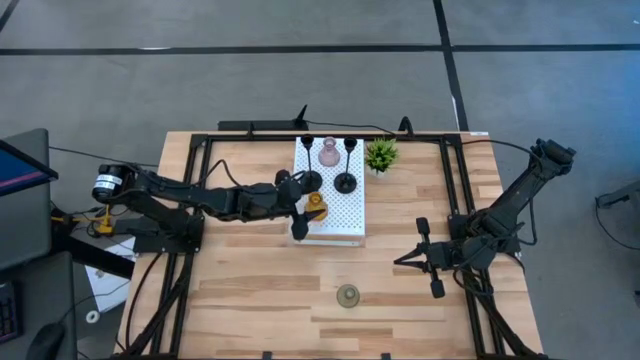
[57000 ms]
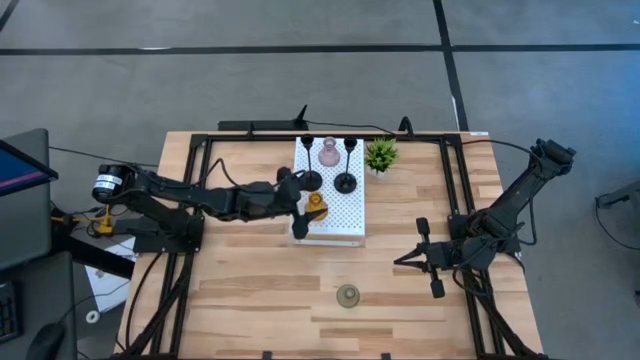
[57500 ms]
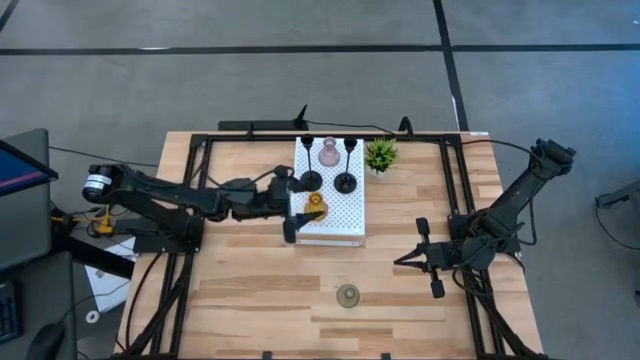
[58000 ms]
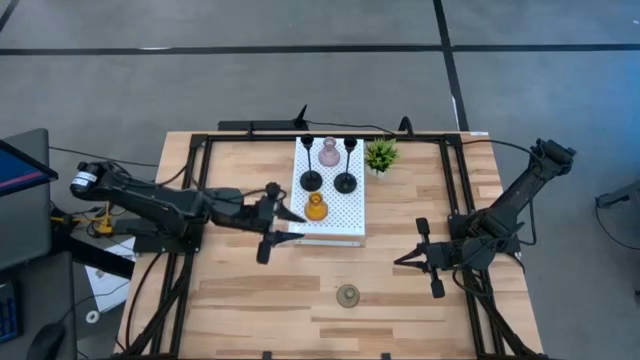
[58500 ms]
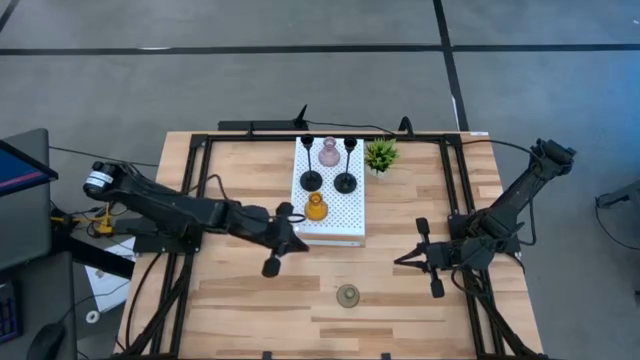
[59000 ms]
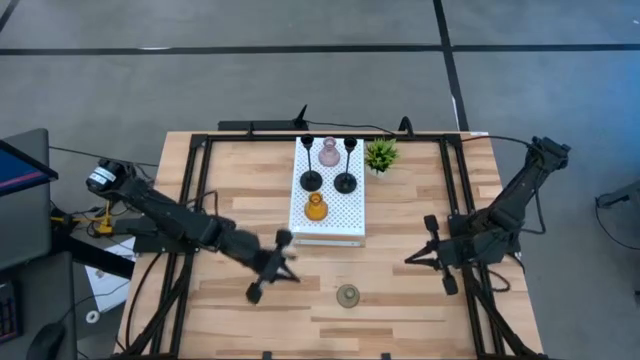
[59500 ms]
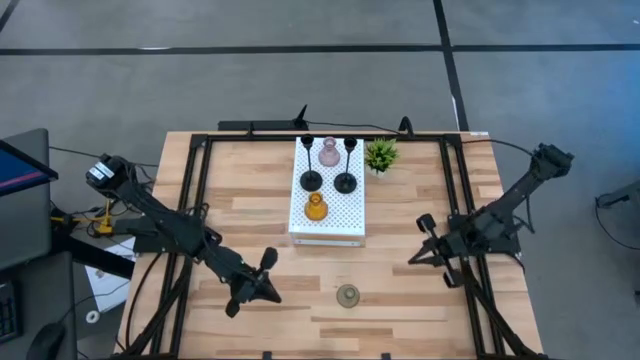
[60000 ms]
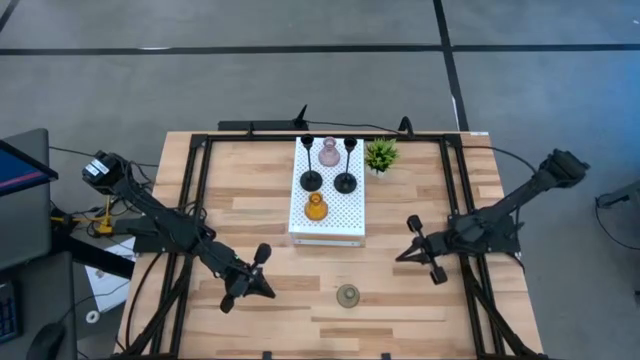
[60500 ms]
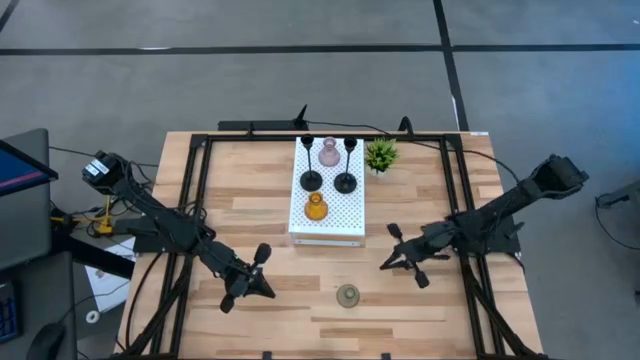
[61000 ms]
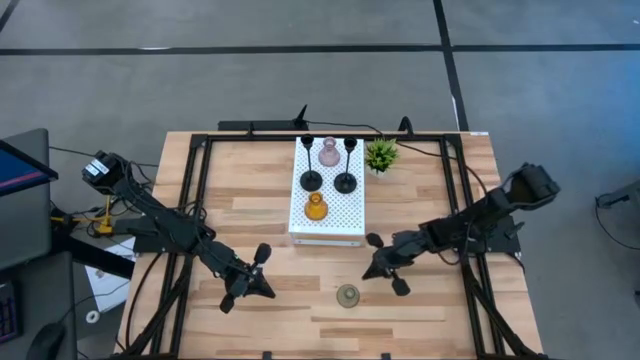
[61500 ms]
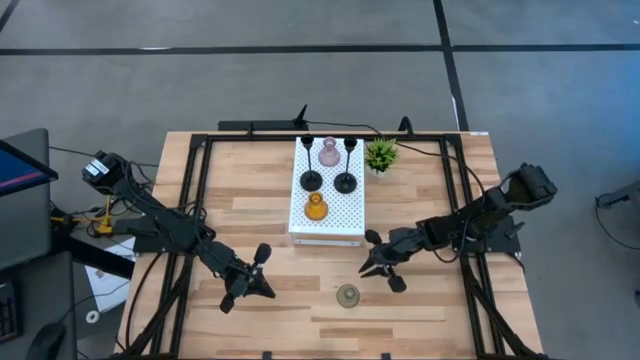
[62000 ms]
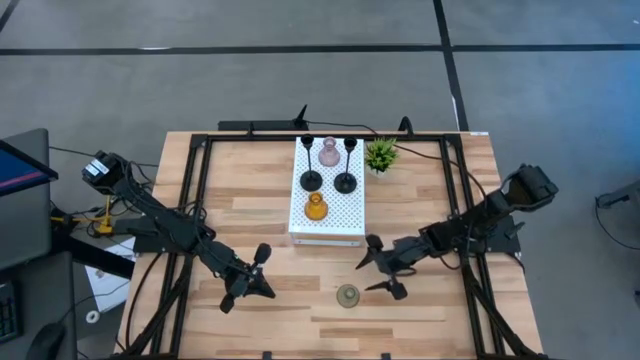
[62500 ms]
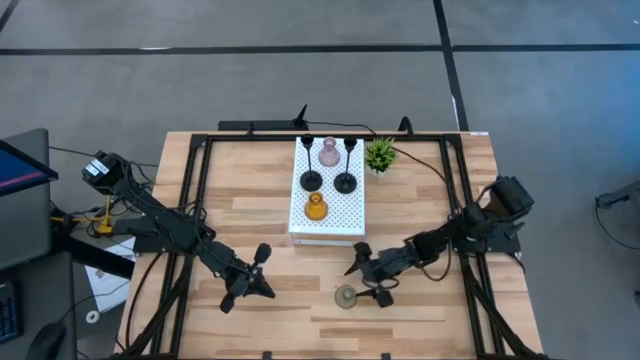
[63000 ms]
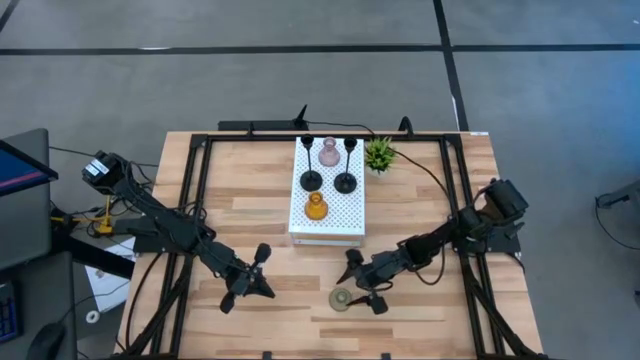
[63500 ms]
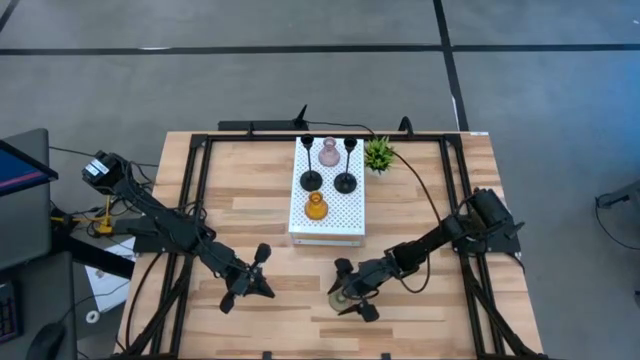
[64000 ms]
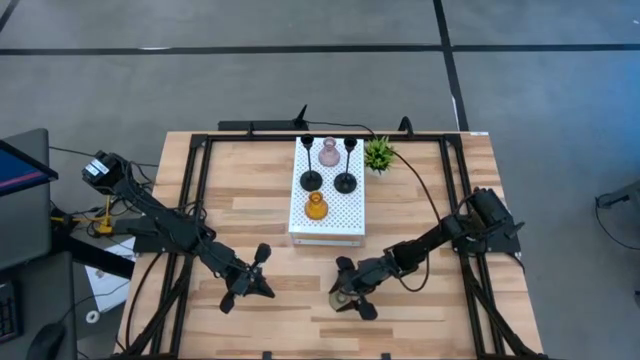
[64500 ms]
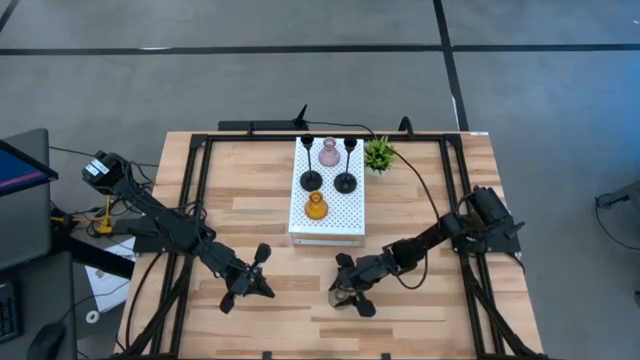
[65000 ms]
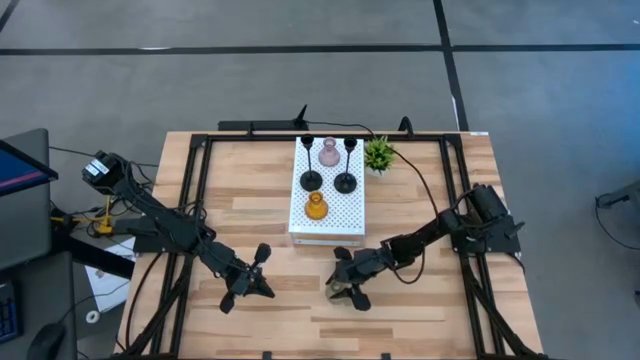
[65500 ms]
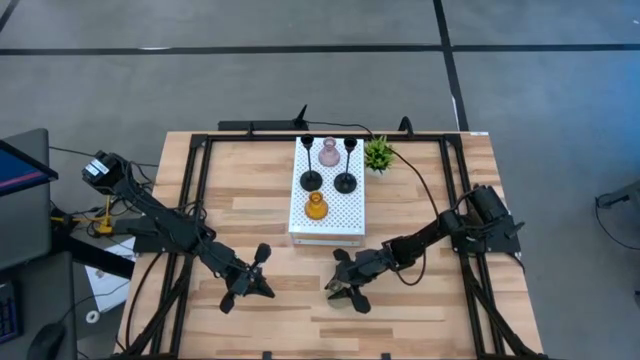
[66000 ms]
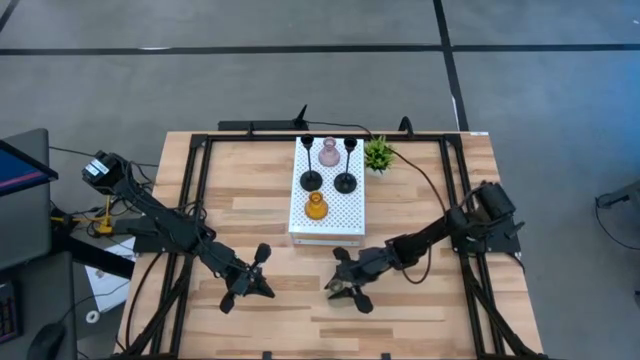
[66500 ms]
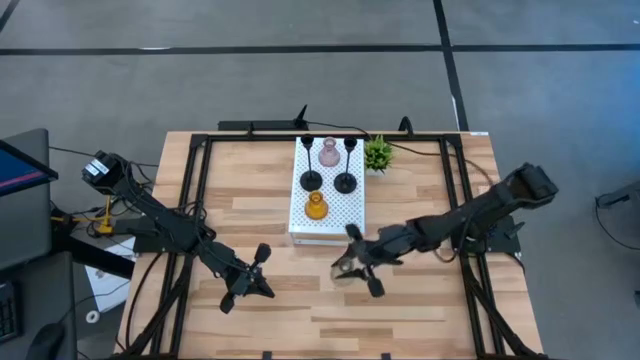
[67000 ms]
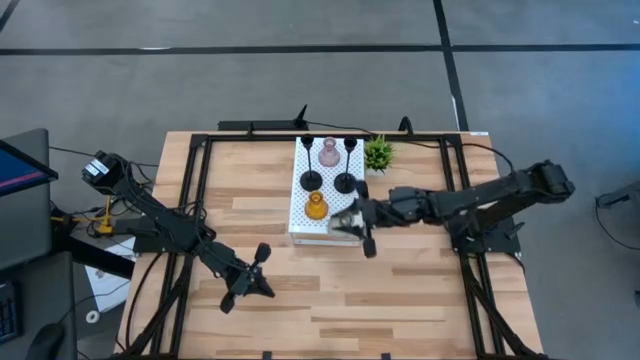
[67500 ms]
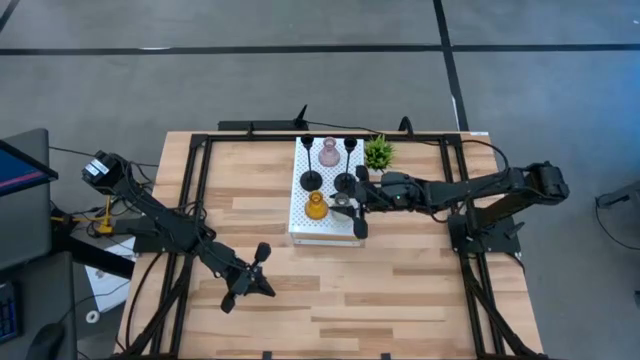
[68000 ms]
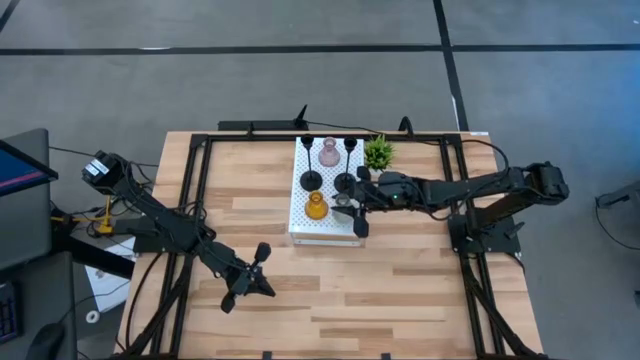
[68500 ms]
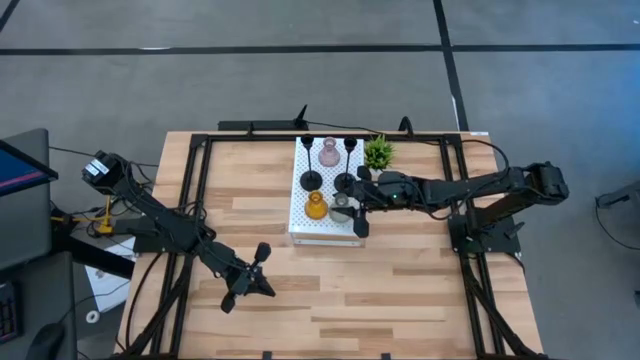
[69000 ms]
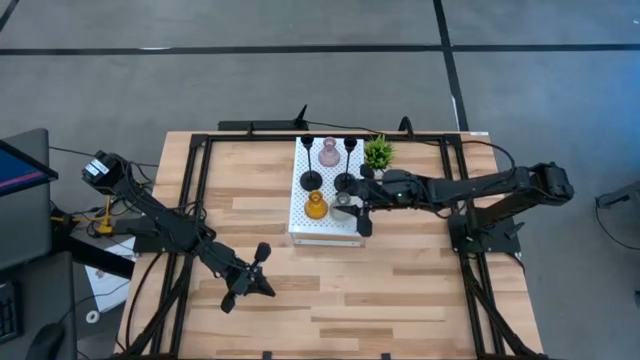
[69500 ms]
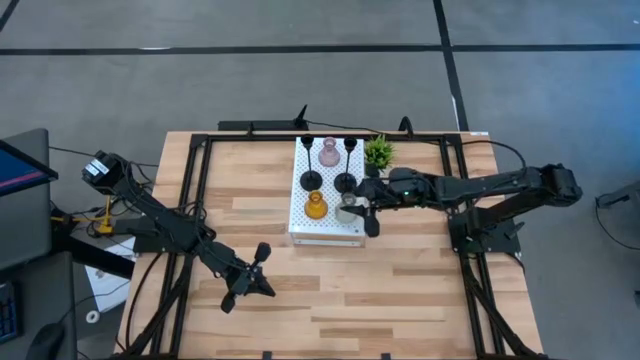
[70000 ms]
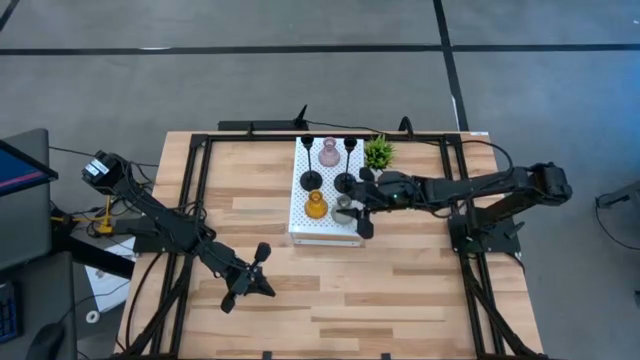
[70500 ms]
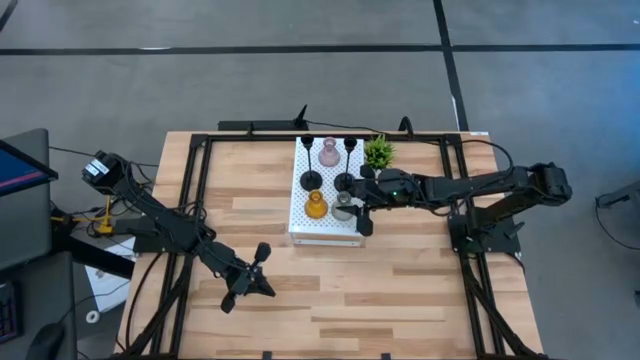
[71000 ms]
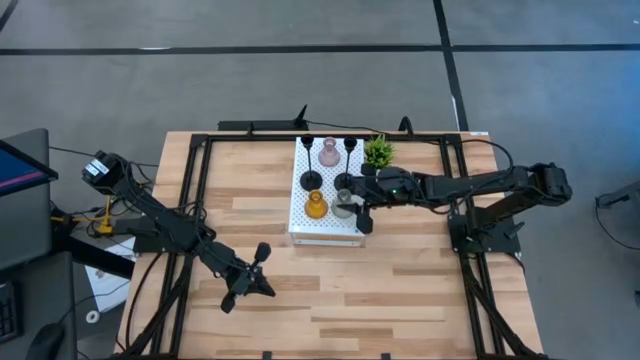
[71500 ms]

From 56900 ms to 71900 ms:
Task: Pick & Place candle stick holders
Align the green glass candle holder with the other orange glass candle holder on the shelf

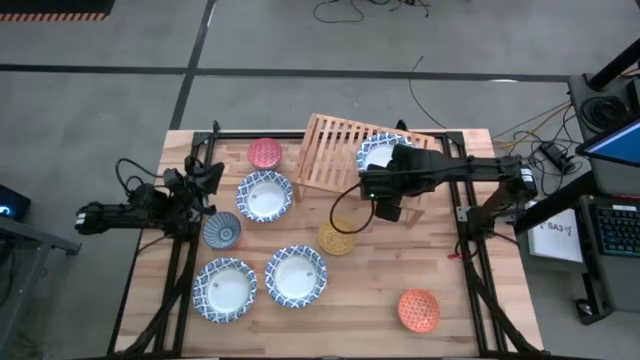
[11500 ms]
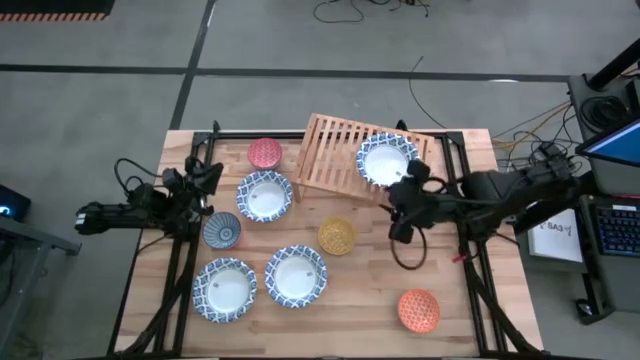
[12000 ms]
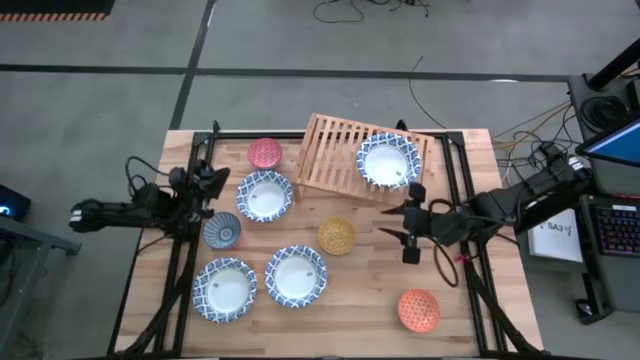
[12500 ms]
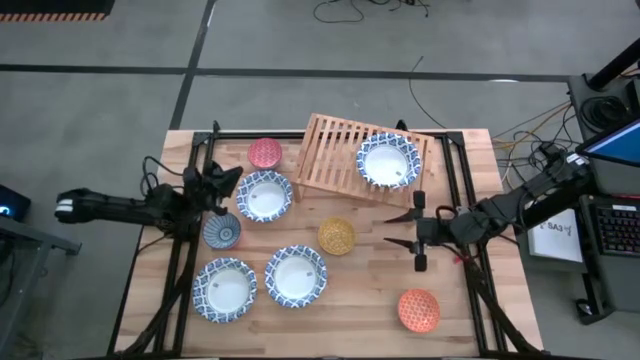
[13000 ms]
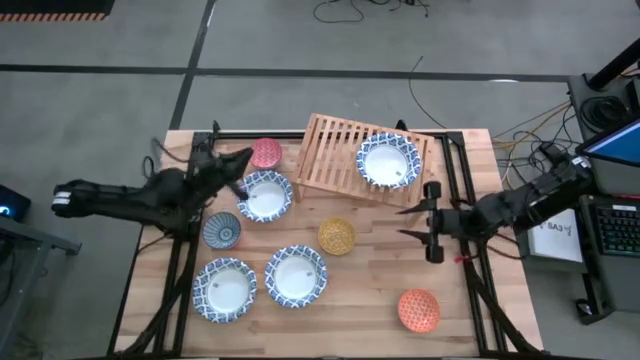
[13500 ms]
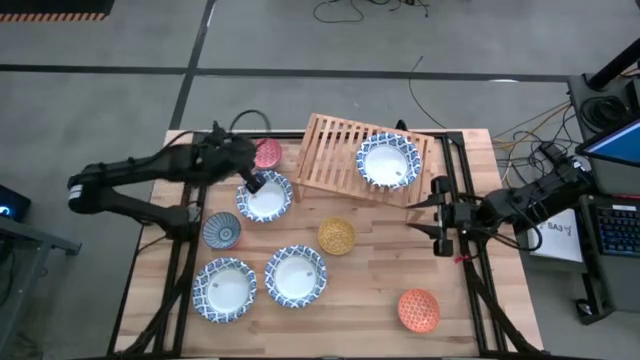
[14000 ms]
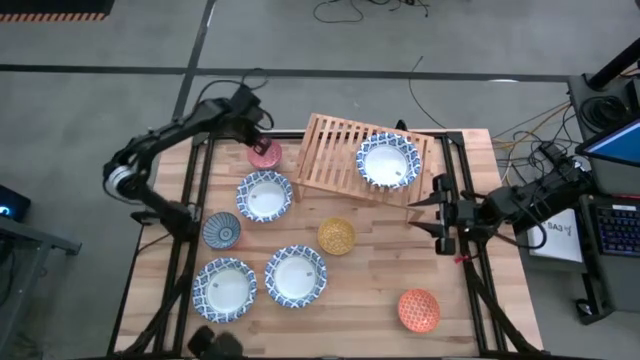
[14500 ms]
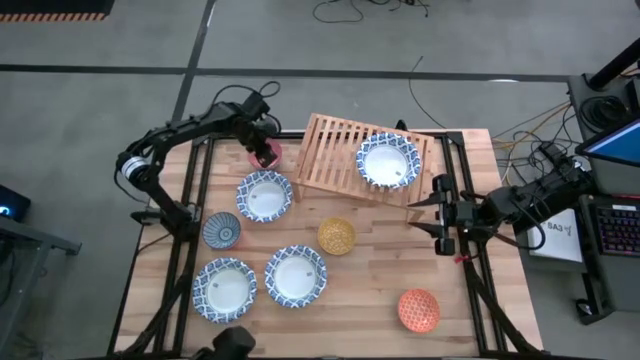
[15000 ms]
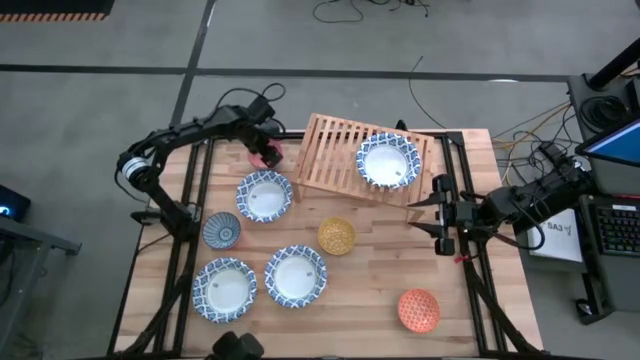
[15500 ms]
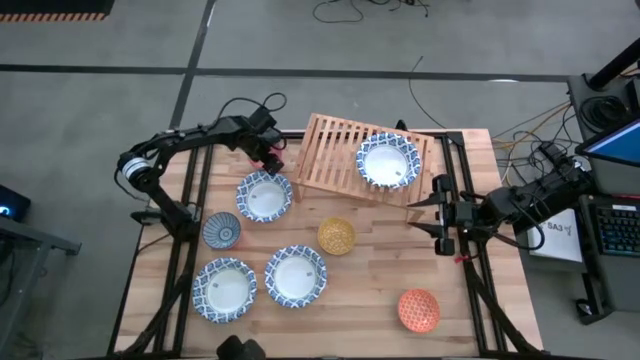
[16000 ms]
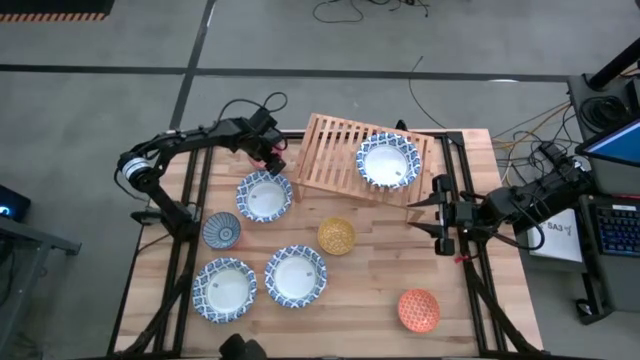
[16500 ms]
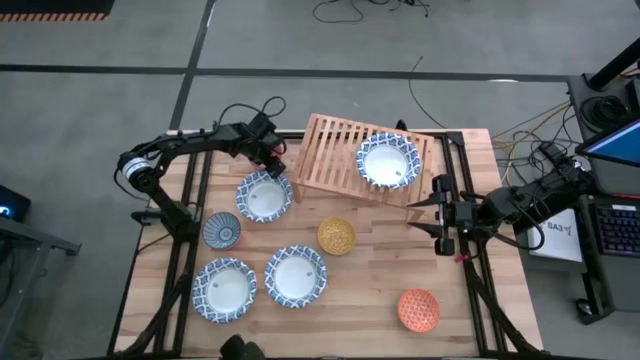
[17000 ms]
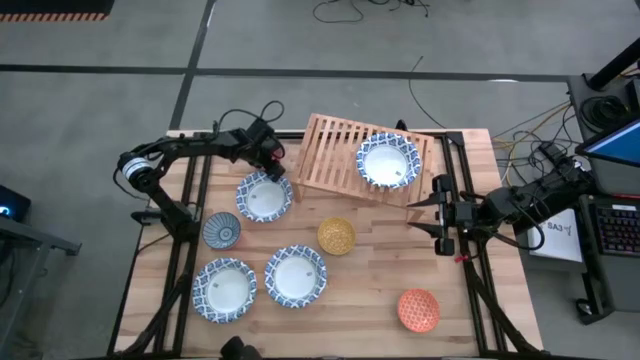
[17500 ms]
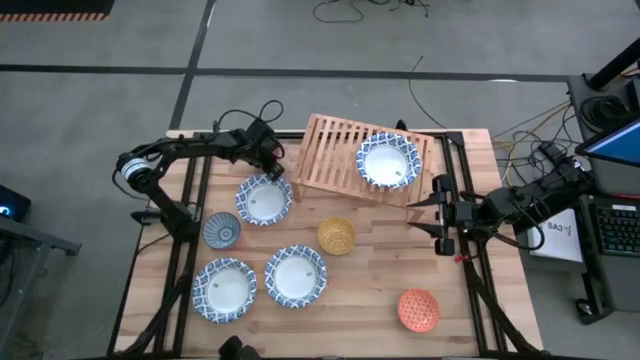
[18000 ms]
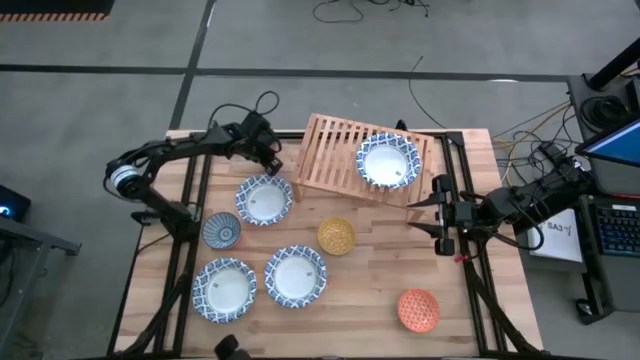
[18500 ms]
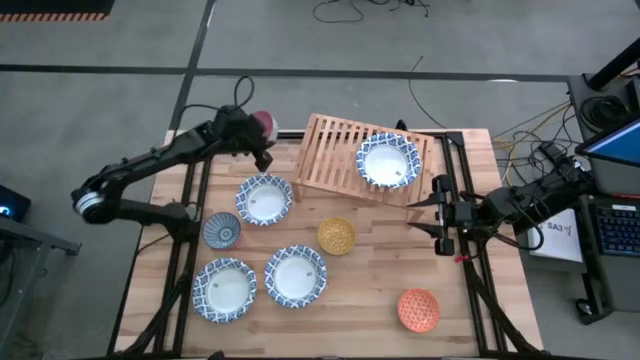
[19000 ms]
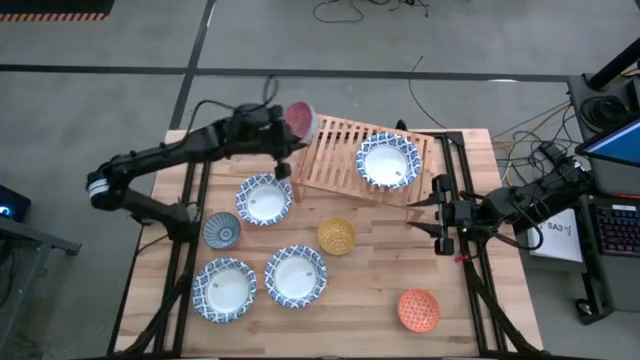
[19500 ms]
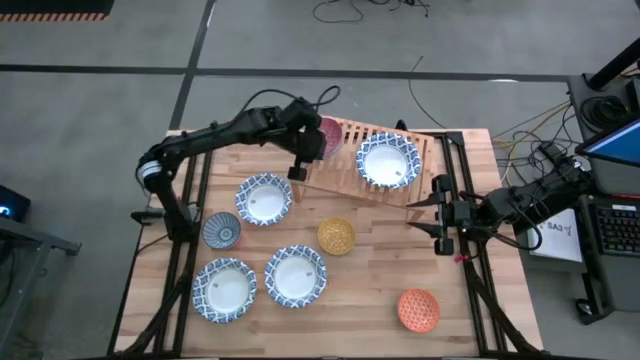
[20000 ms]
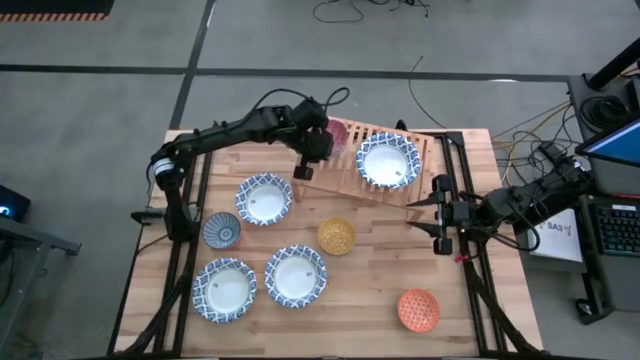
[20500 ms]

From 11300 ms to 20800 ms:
Task: Place and stack bowls onto a shelf
Put the red pattern bowl on the shelf
